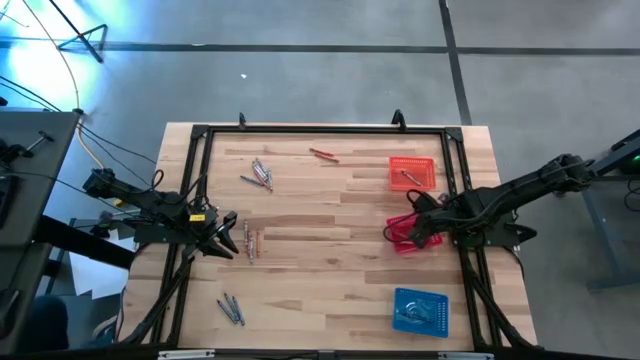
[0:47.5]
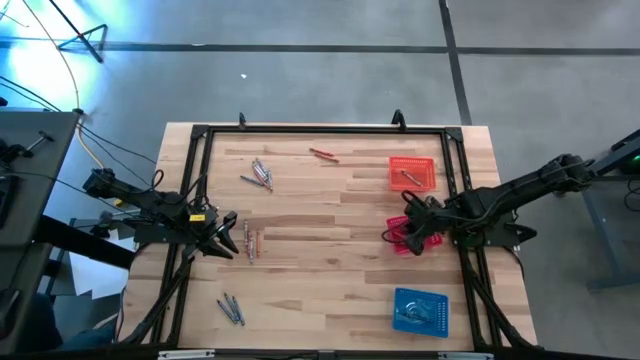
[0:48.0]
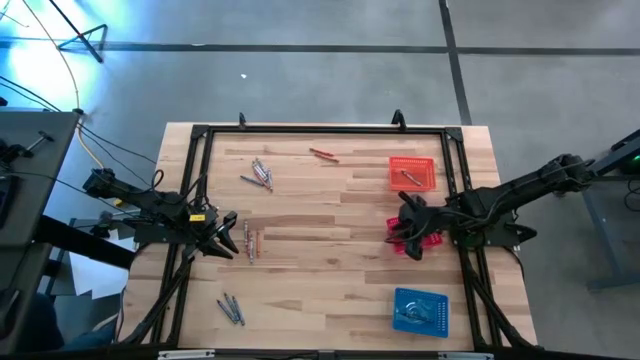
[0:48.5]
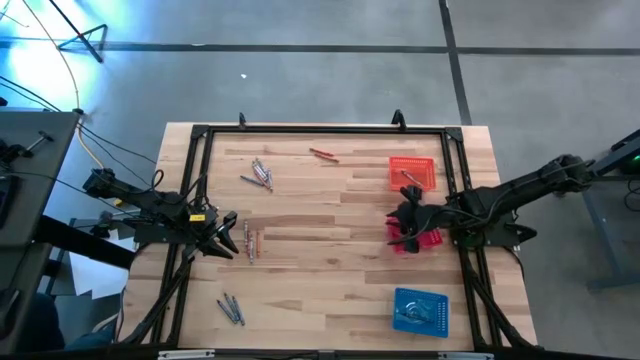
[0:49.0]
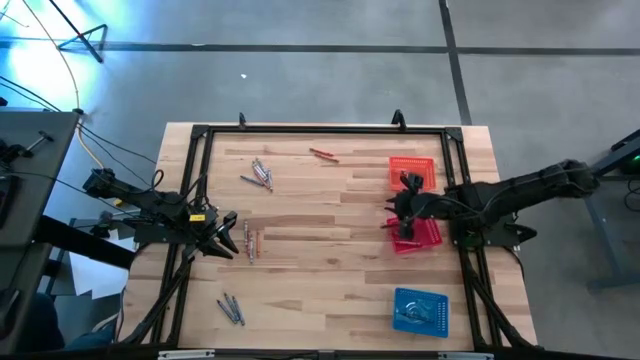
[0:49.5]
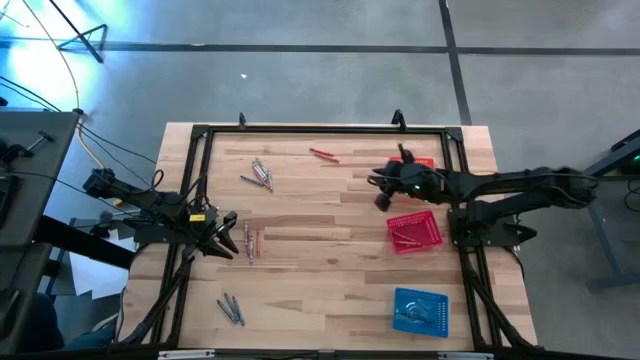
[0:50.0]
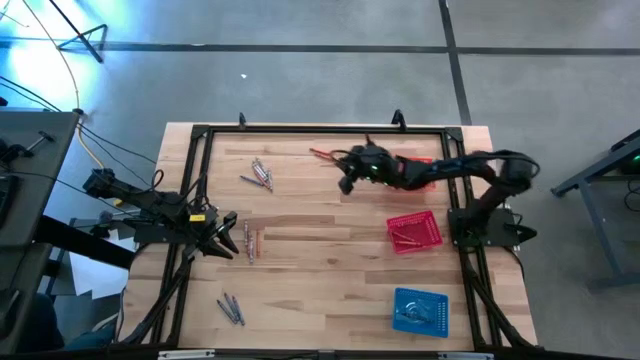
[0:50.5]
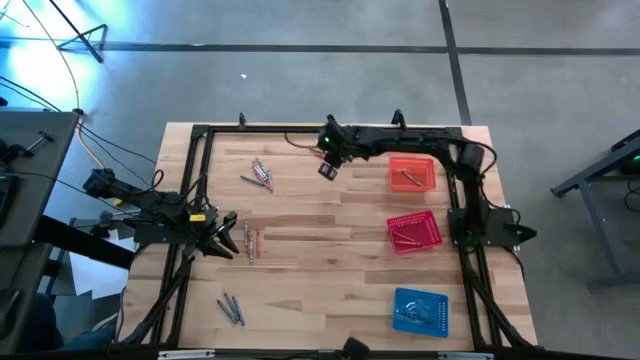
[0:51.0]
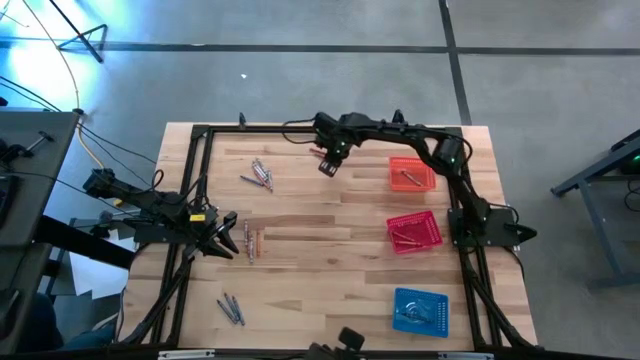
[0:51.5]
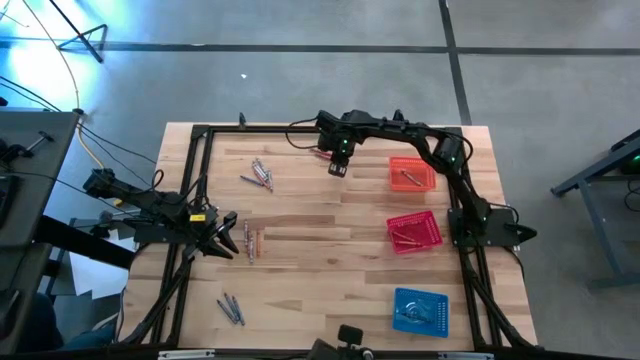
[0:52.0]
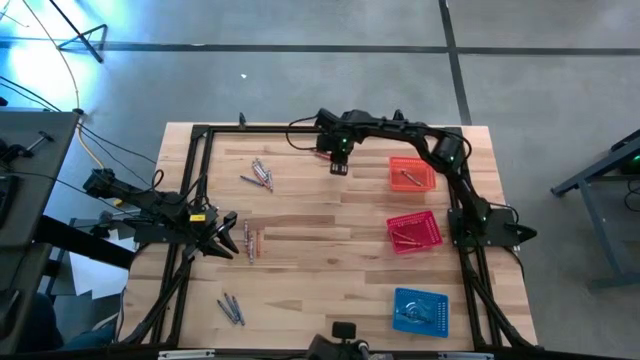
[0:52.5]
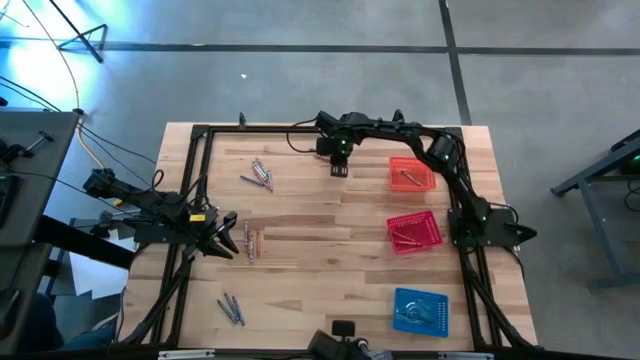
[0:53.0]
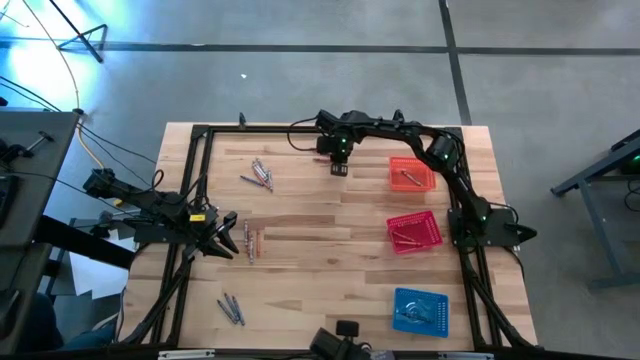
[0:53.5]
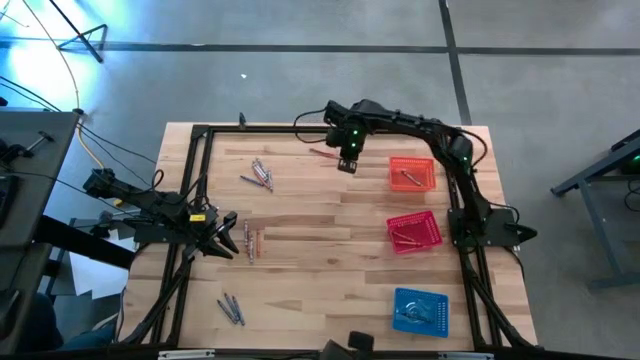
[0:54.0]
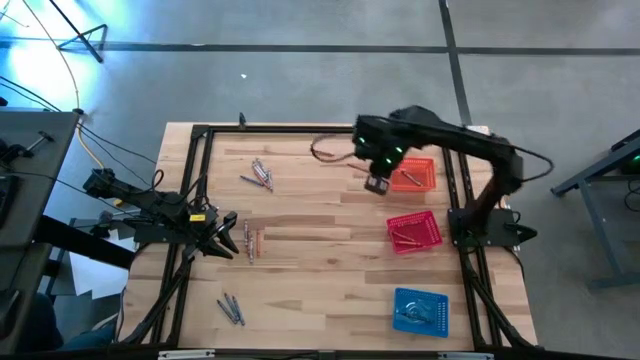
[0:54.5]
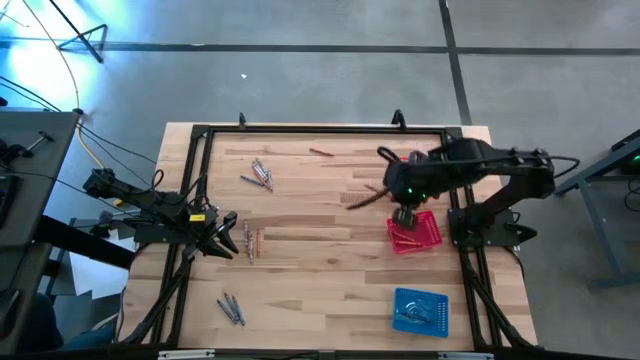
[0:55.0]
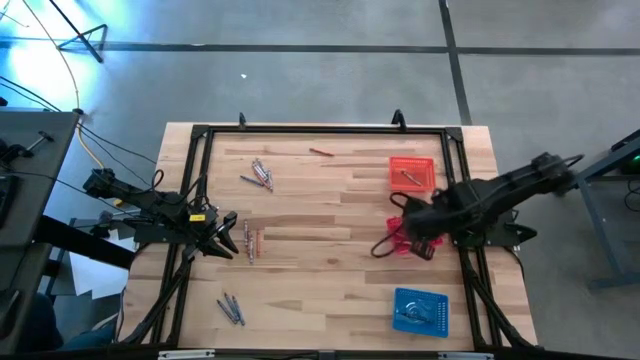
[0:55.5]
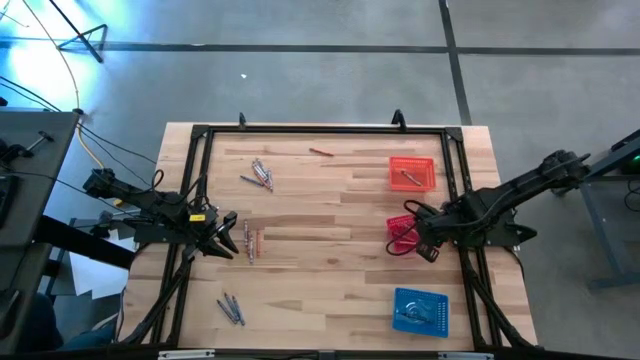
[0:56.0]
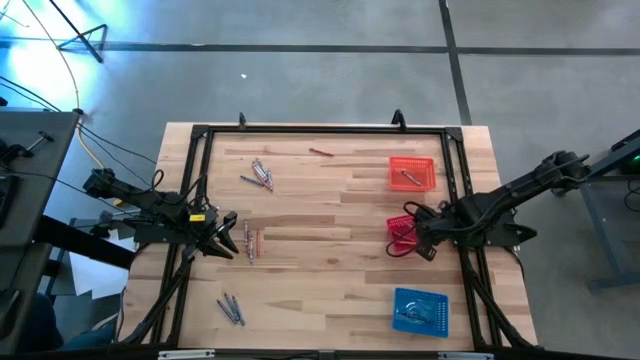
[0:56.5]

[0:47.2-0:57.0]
Task: Sort crayons
Put the orange crayon into the red bin

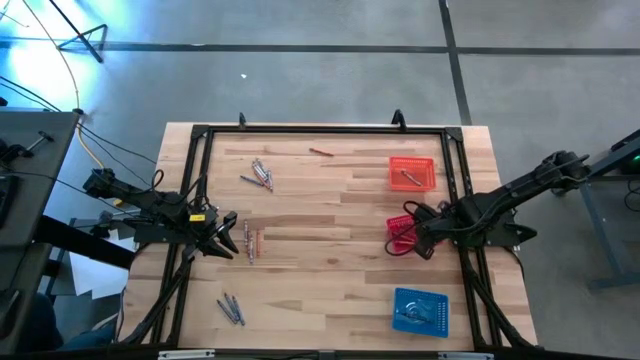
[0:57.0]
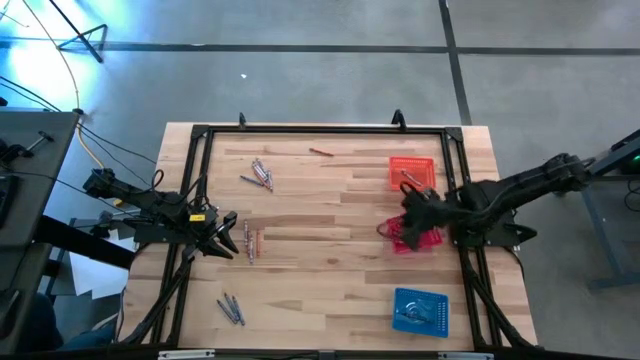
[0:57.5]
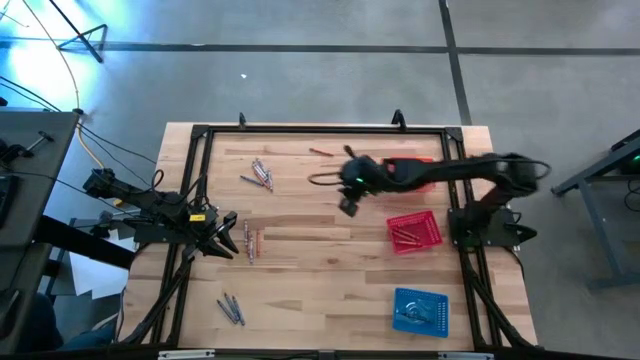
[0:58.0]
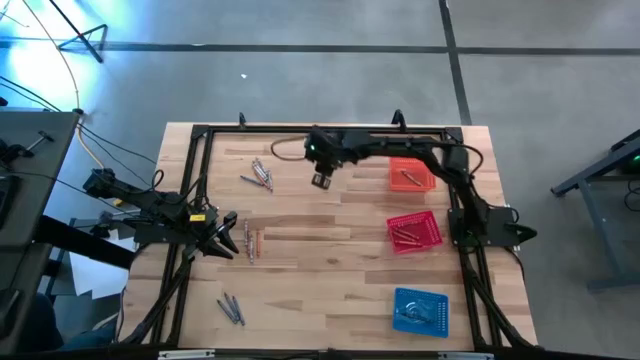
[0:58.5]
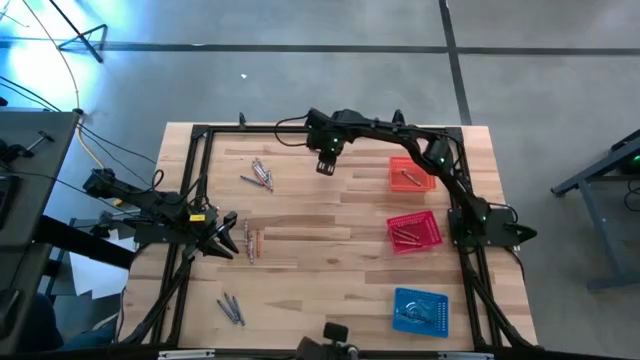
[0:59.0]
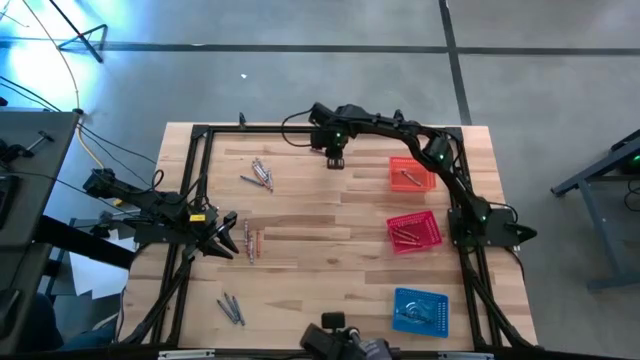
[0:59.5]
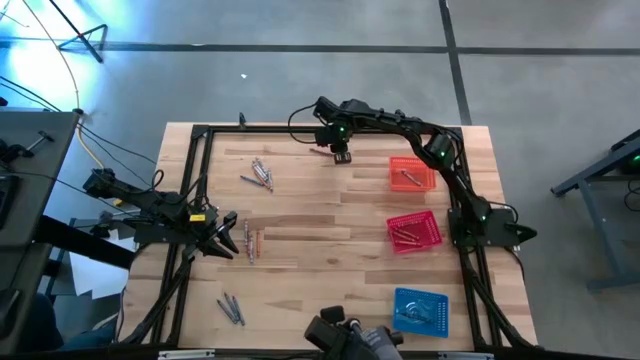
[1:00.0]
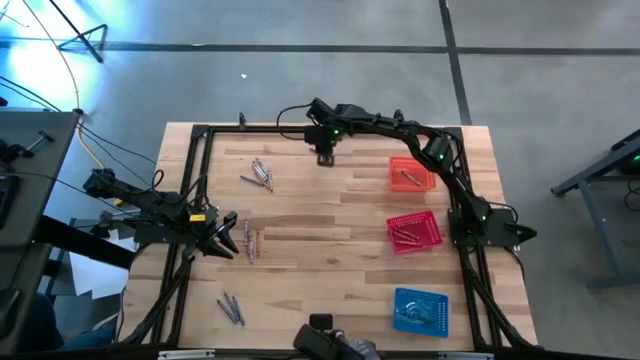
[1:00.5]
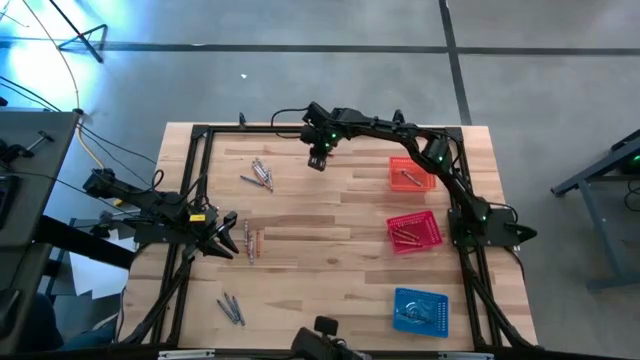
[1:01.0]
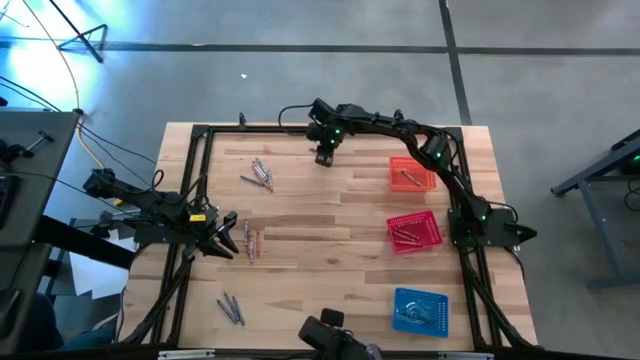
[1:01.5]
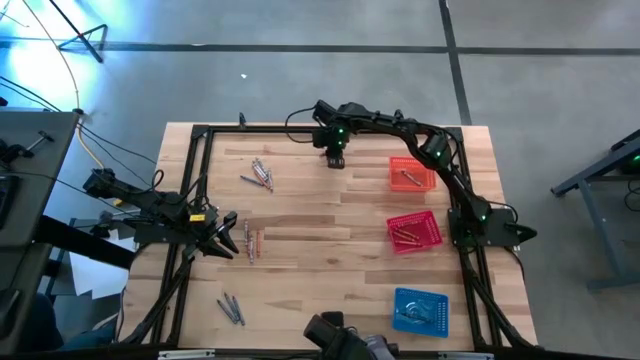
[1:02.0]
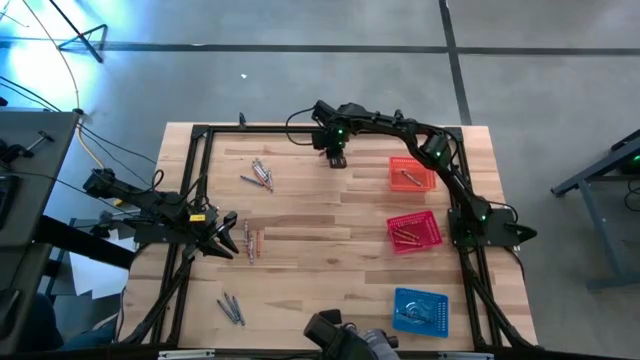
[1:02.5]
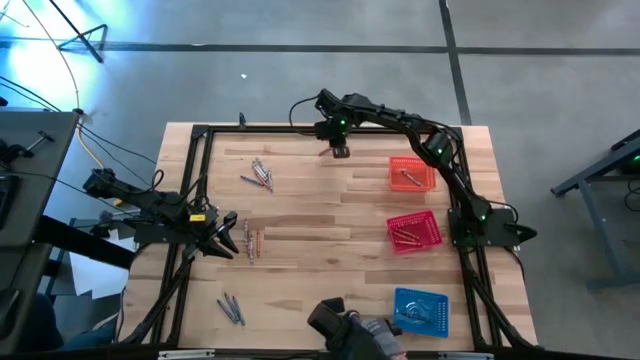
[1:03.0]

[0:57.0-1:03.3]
Put the orange crayon into the red bin

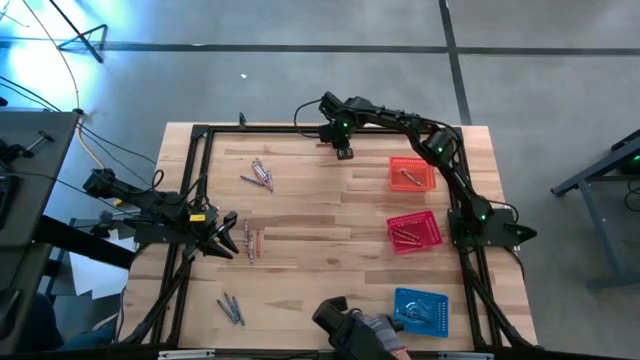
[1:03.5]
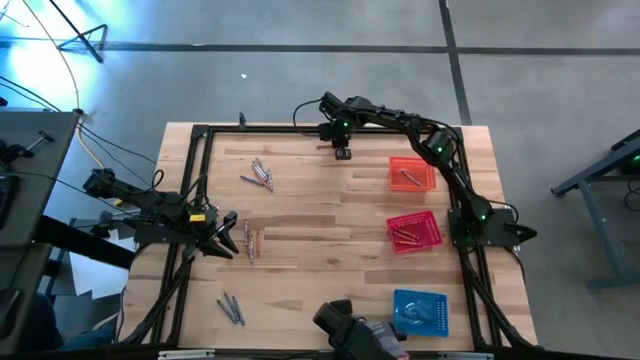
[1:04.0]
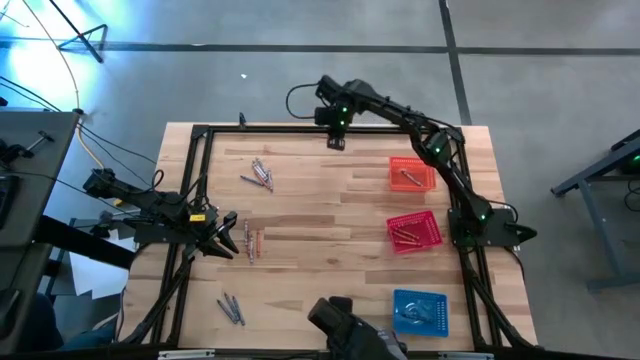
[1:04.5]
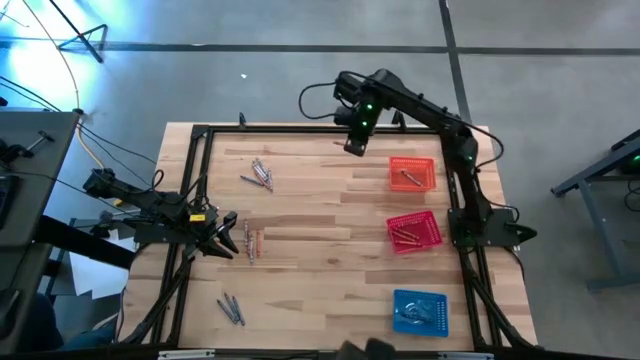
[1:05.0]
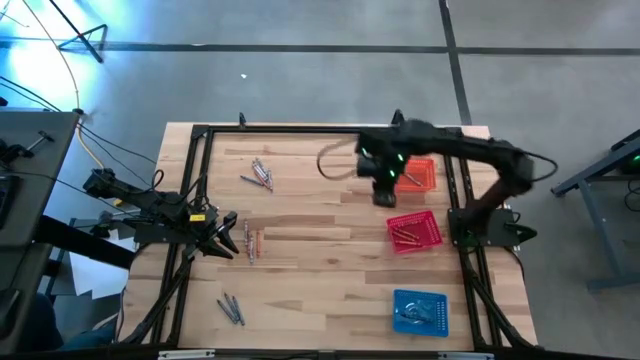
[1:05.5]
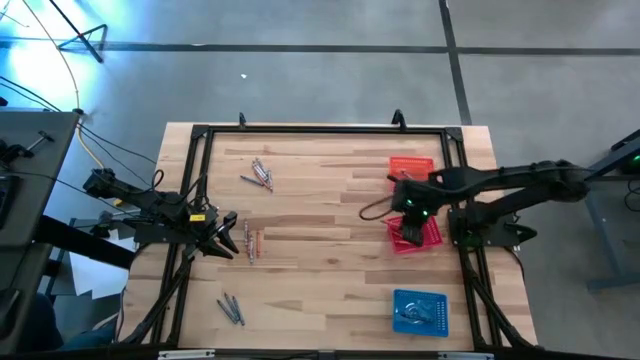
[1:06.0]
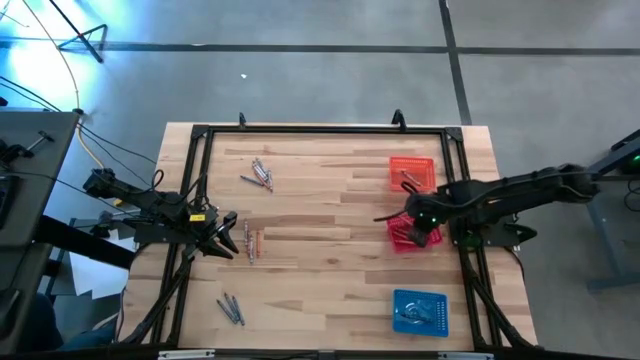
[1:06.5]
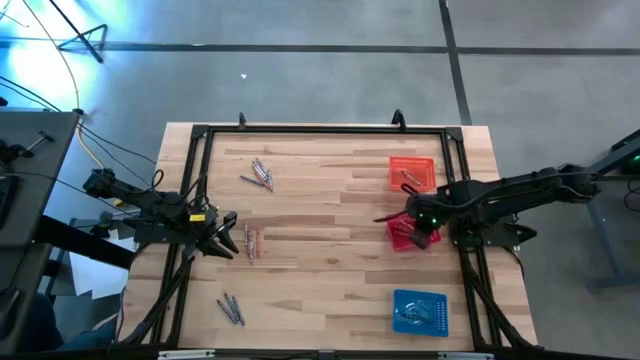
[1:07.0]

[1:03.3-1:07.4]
Put the orange crayon into the red bin

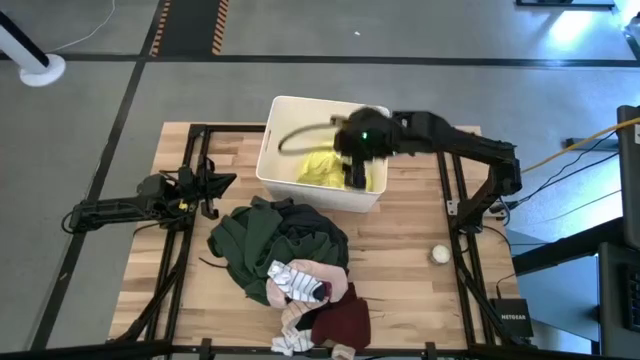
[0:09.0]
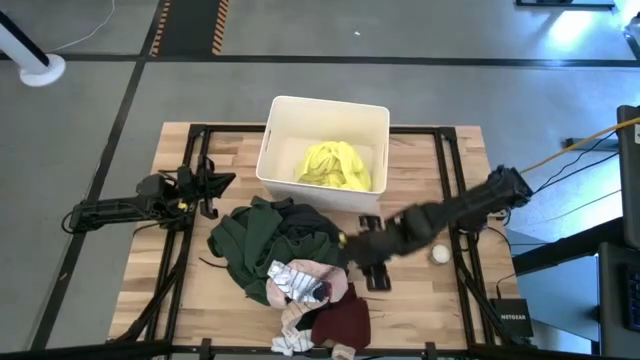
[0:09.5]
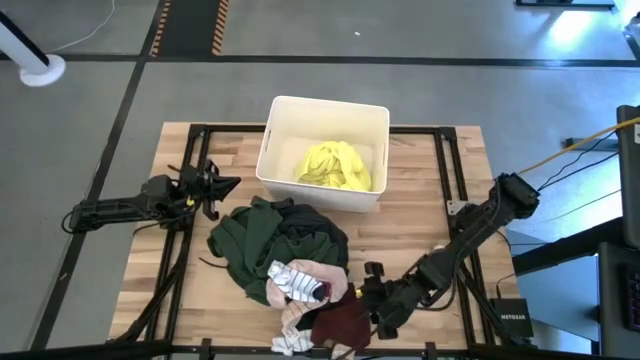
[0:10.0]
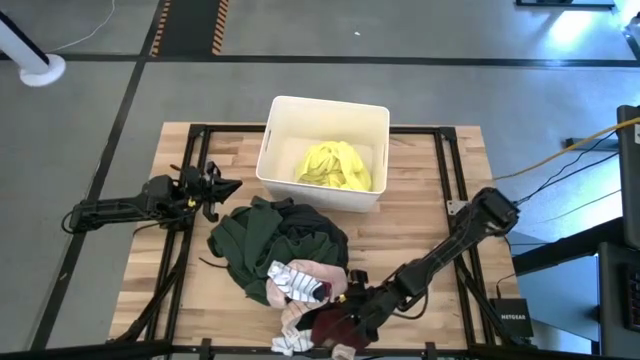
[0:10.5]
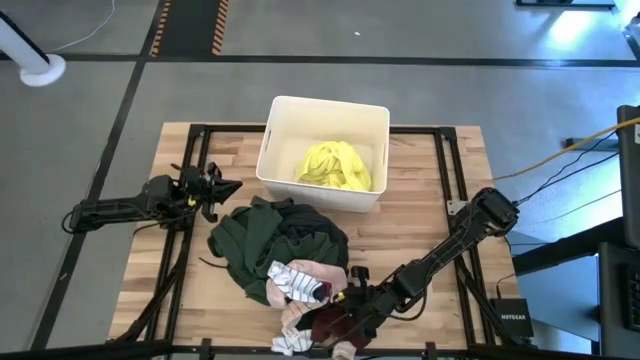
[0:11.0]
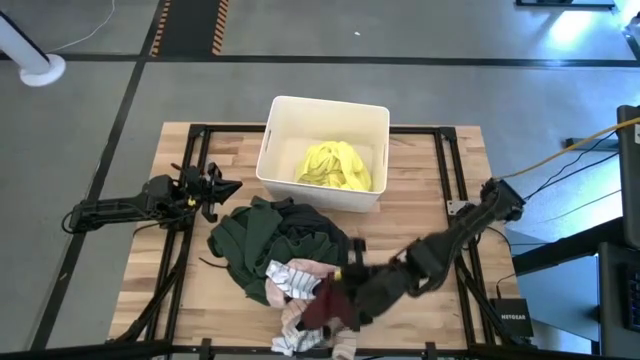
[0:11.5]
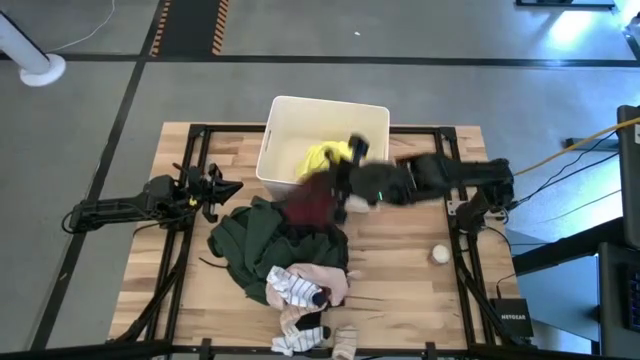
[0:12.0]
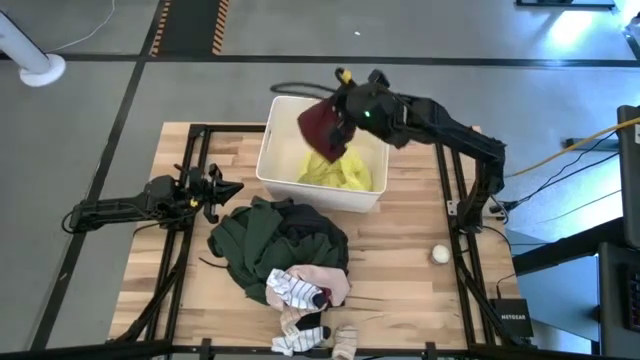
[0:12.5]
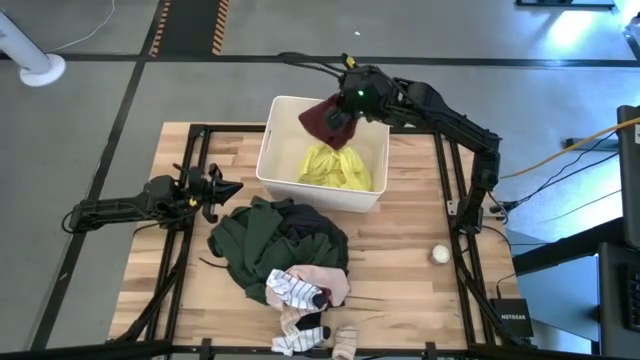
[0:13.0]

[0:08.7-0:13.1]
Task: Sort clothes
Put the dark red underwear into the white bin
